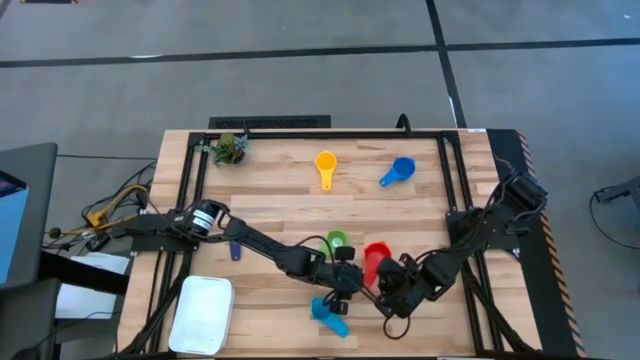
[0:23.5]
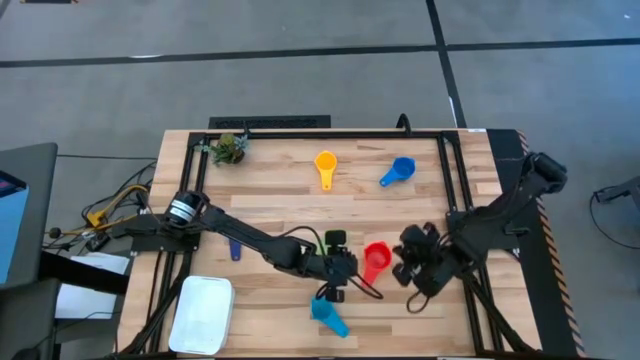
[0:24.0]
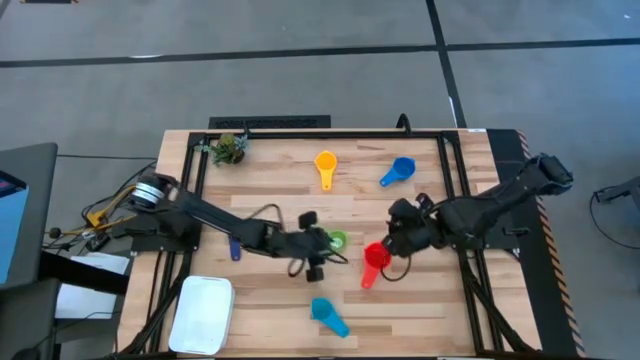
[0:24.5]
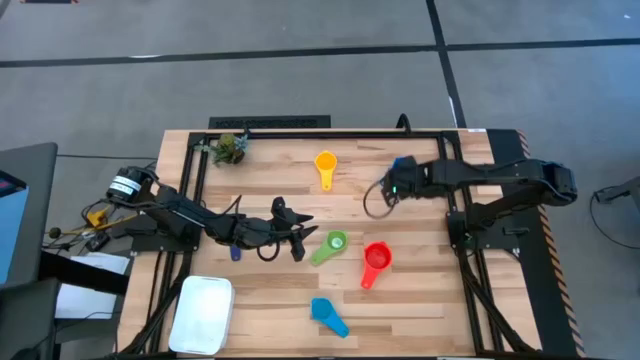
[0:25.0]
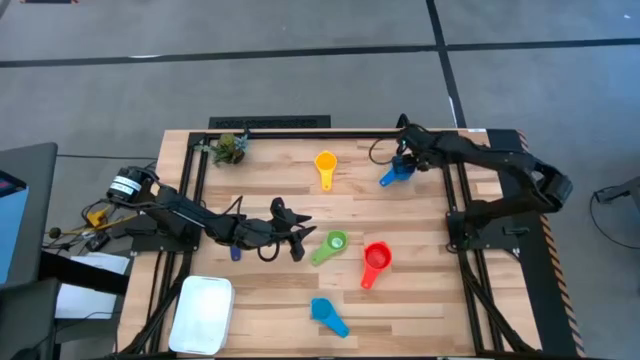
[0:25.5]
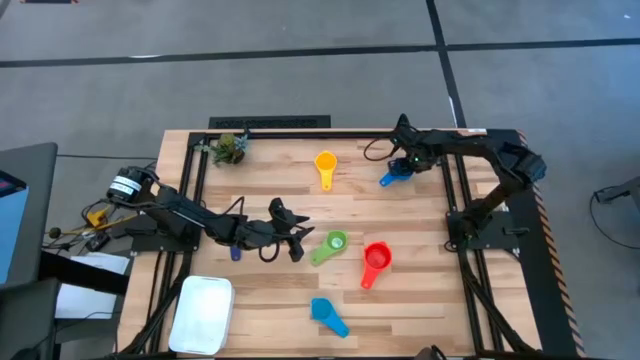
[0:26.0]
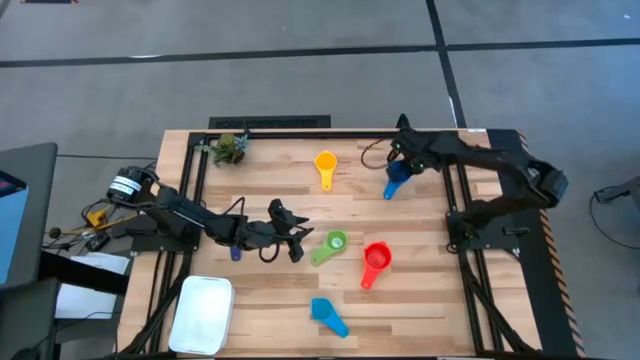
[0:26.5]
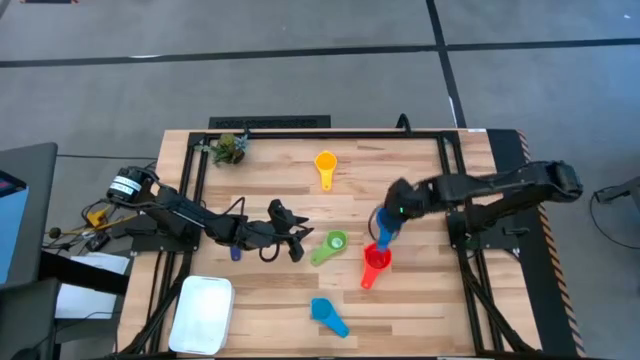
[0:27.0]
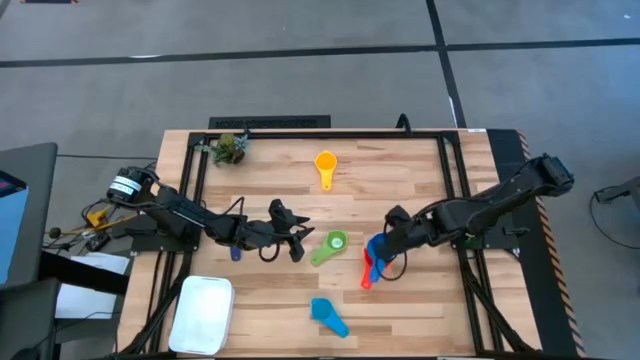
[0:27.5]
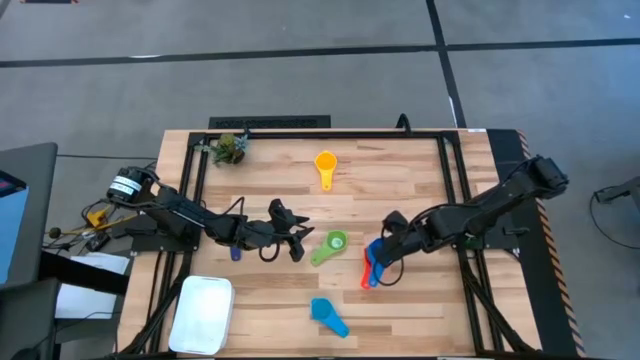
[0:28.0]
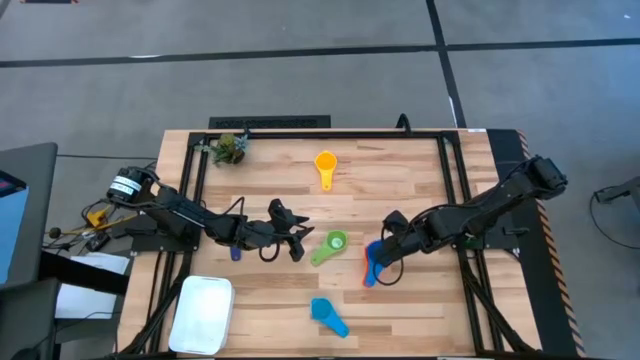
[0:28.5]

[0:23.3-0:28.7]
Task: Nest measuring cups in basket
Stack the blue measuring cup on top of the red measuring cup

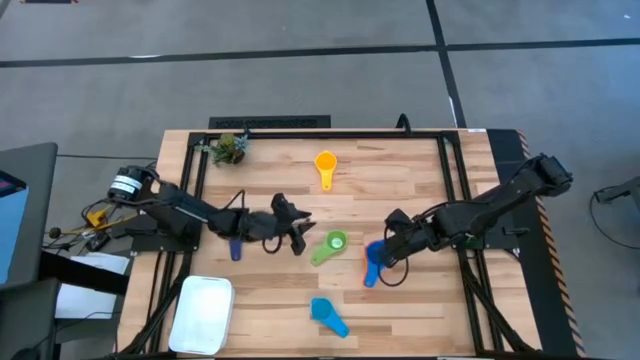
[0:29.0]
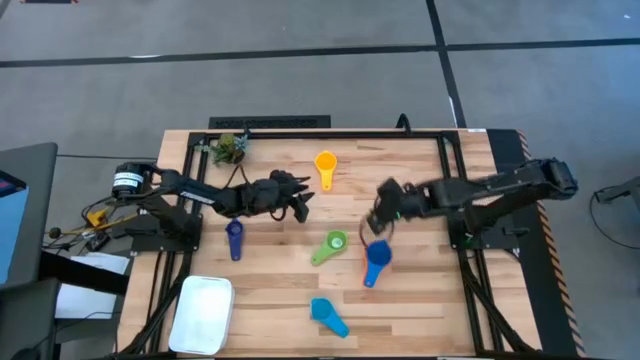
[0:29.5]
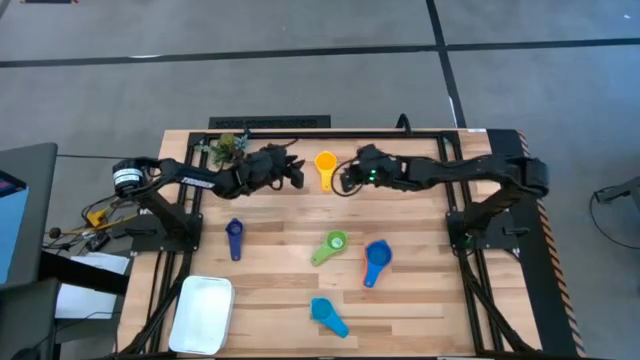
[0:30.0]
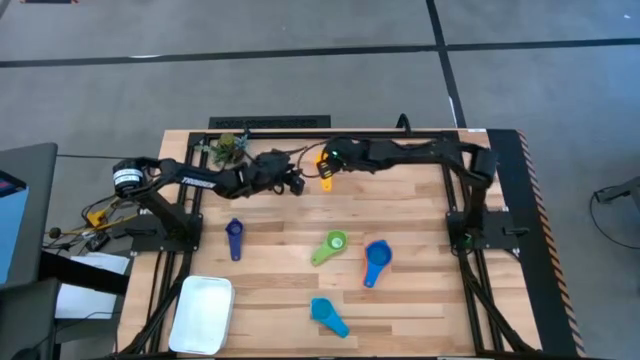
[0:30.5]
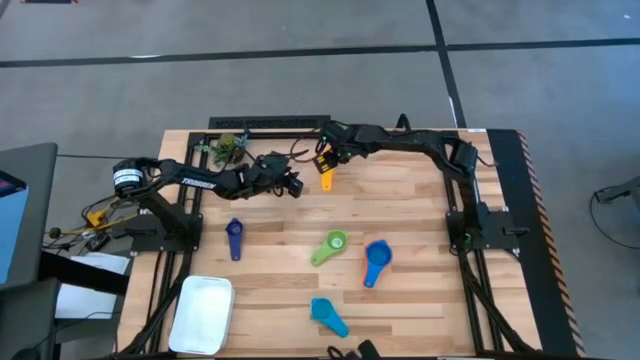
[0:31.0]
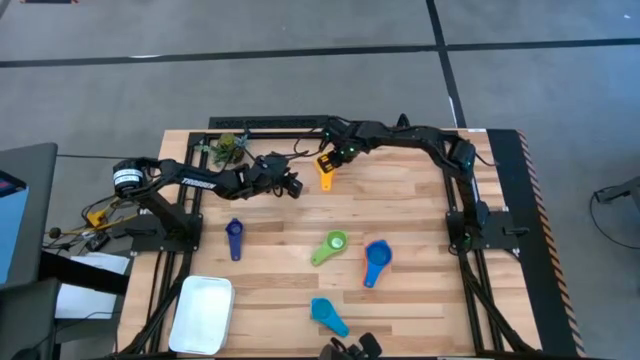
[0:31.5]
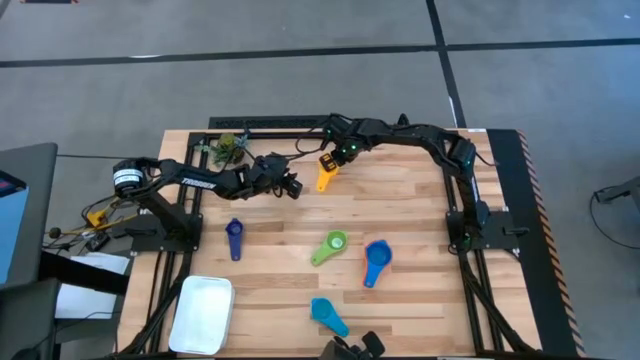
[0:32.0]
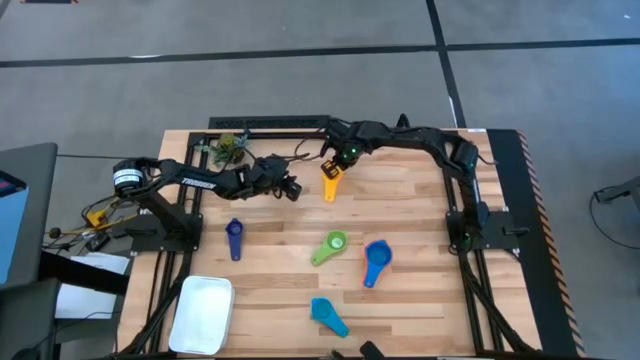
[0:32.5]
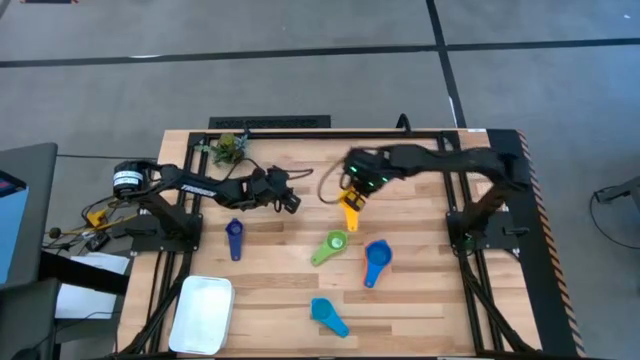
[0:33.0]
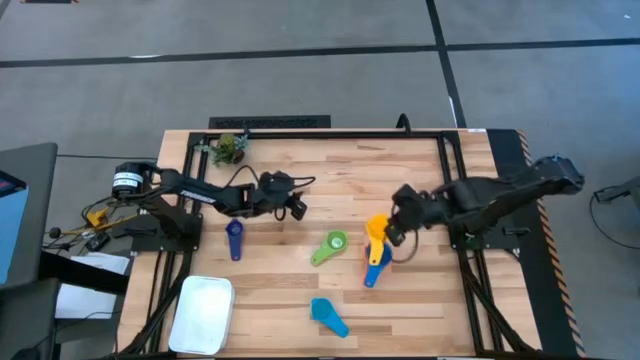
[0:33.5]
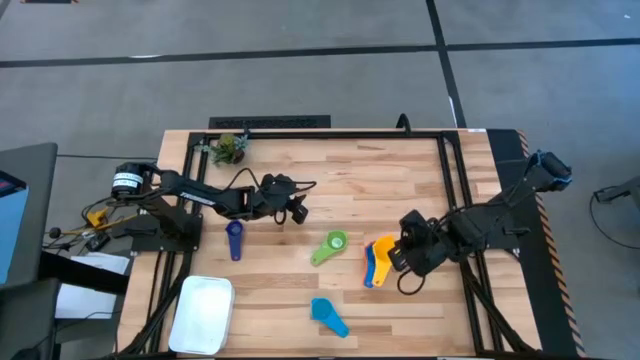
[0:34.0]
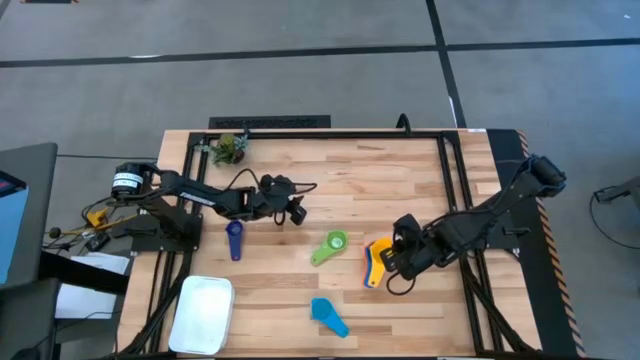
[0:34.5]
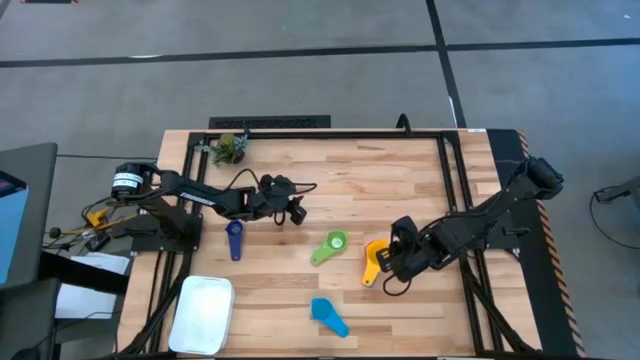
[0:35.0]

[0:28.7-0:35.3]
Stack the yellow measuring cup on top of the blue measuring cup

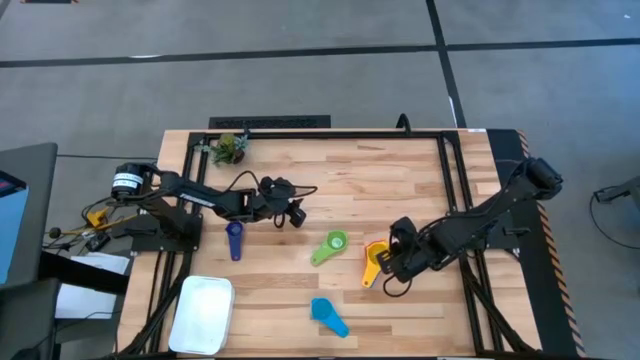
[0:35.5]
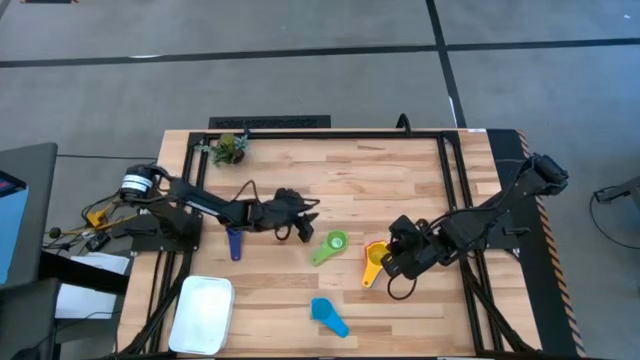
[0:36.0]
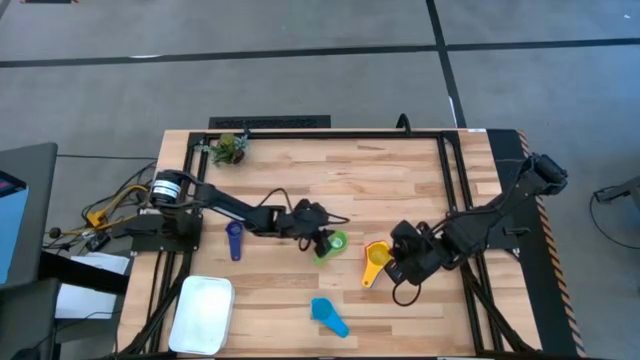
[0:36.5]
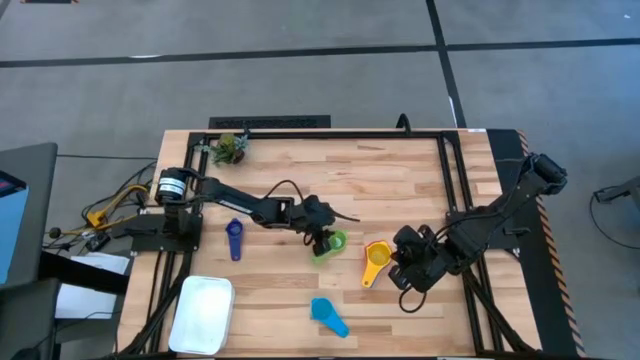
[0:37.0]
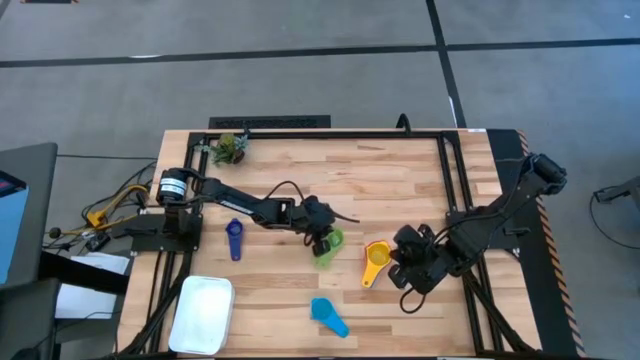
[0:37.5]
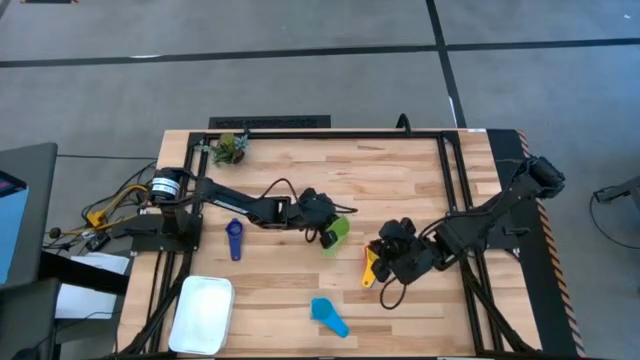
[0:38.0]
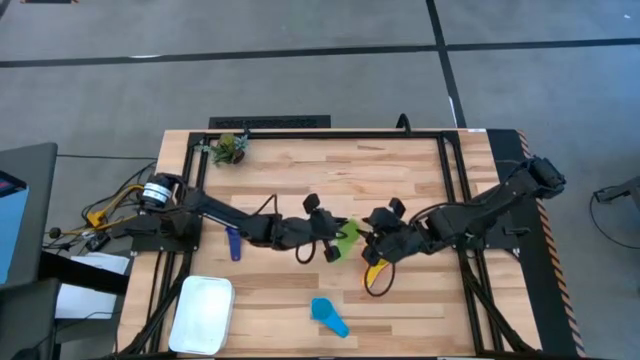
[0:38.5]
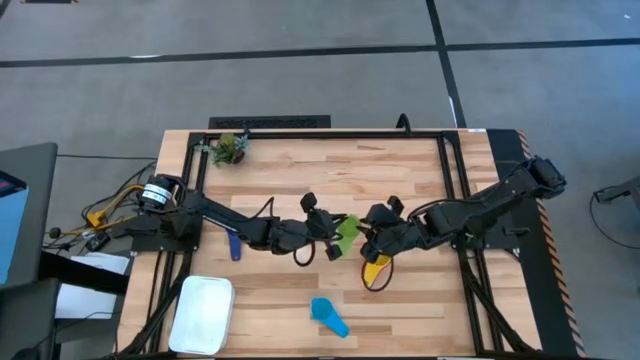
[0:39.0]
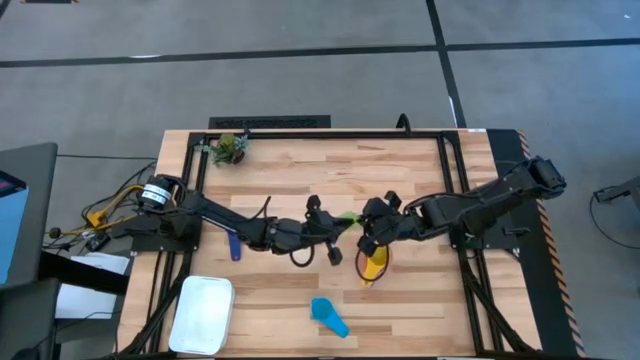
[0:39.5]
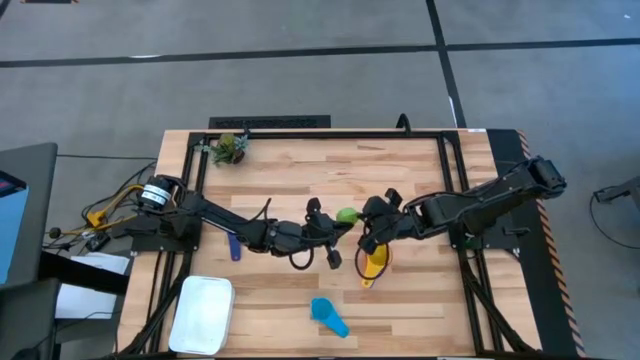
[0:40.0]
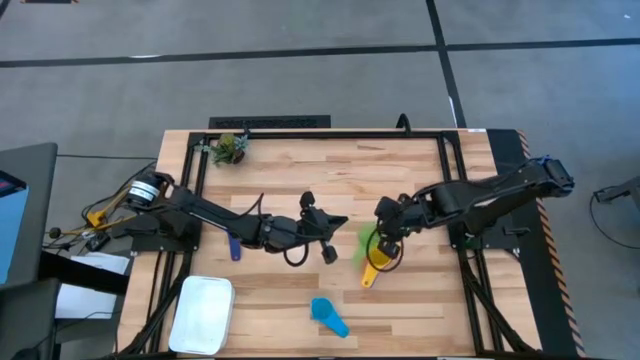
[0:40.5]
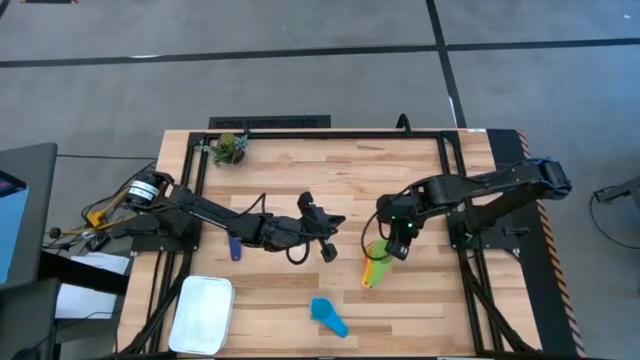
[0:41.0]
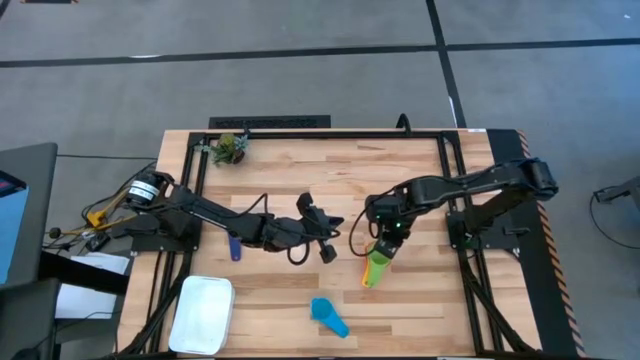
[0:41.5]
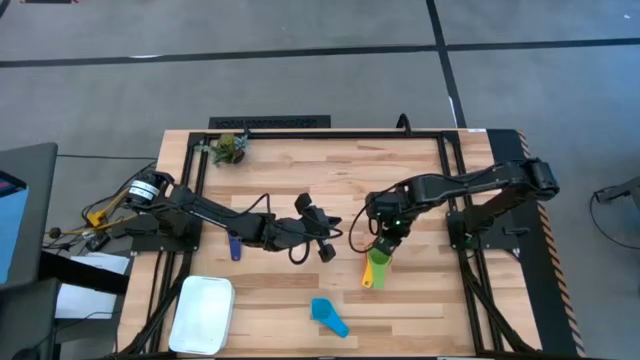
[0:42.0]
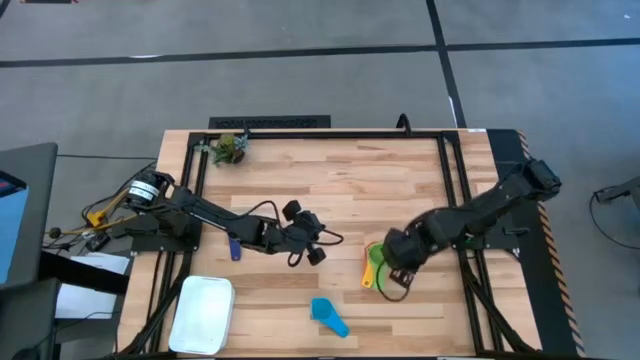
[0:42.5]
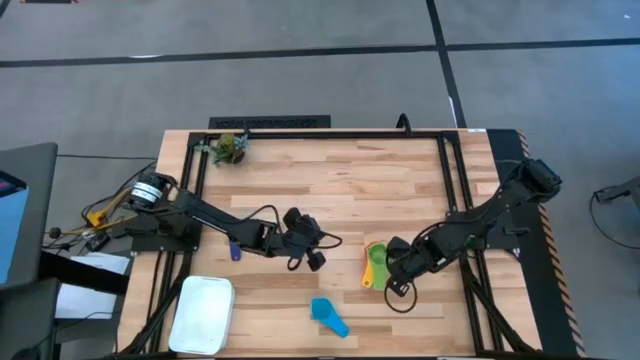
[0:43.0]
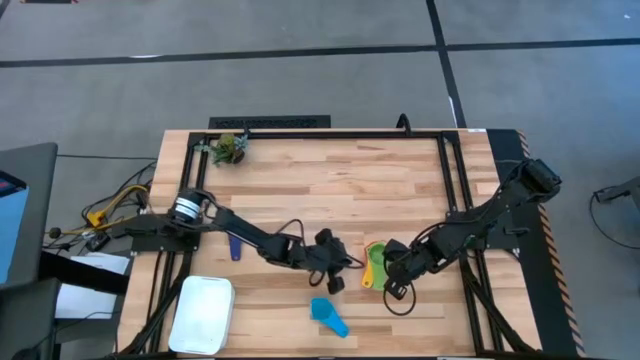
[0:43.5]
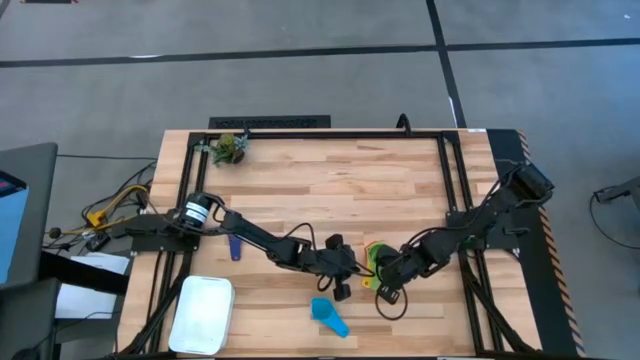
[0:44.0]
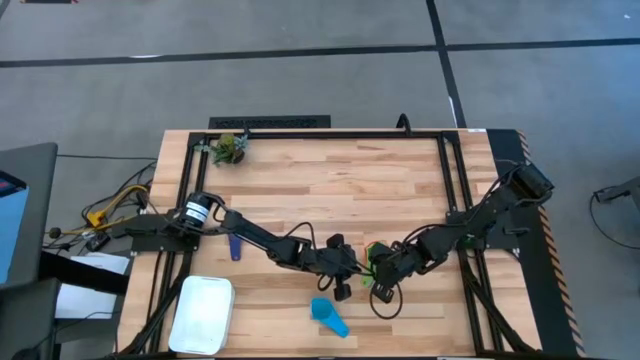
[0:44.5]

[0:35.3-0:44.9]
Stack the green measuring cup on top of the yellow measuring cup
